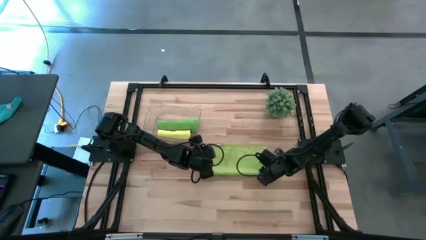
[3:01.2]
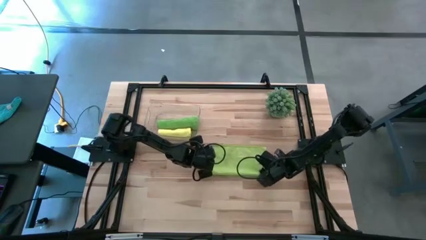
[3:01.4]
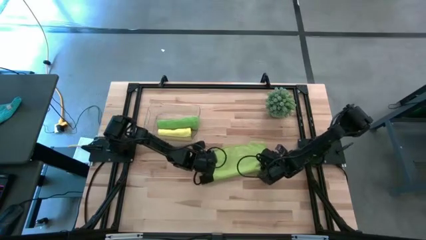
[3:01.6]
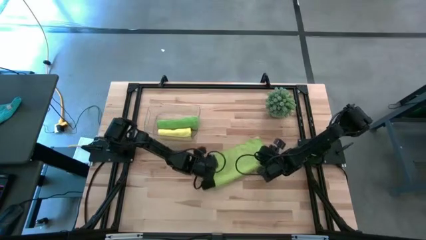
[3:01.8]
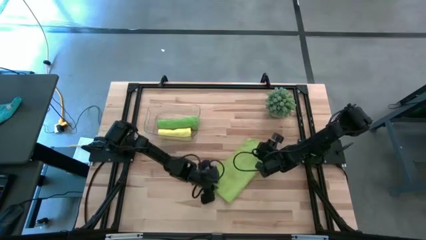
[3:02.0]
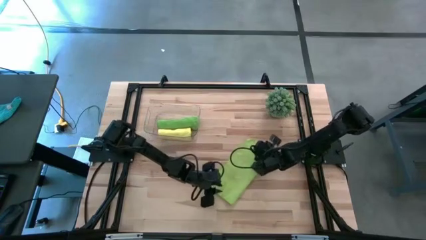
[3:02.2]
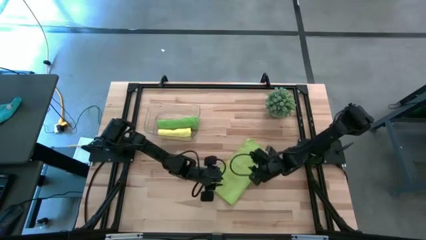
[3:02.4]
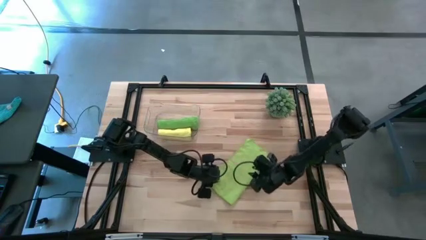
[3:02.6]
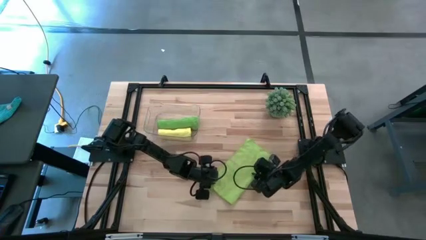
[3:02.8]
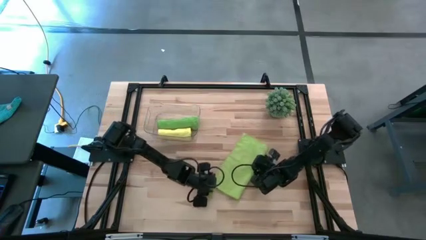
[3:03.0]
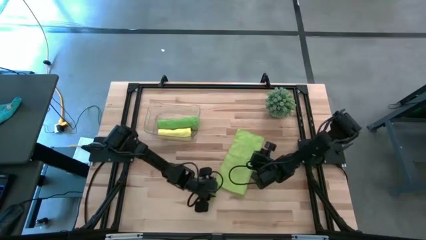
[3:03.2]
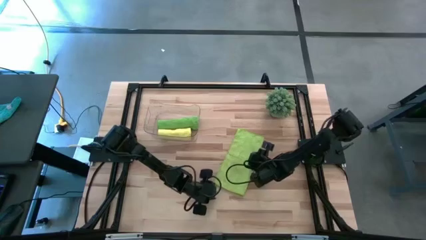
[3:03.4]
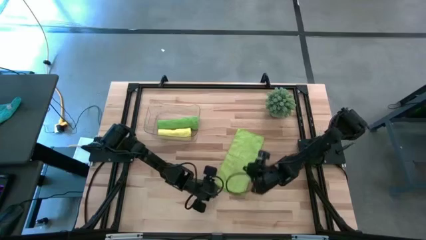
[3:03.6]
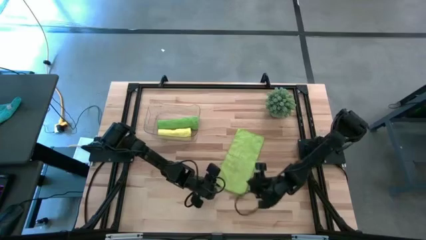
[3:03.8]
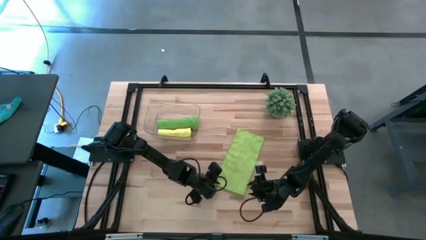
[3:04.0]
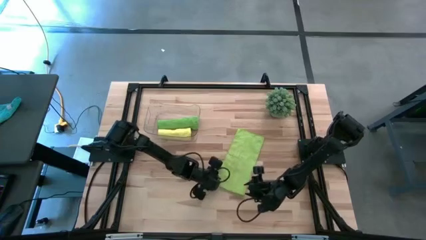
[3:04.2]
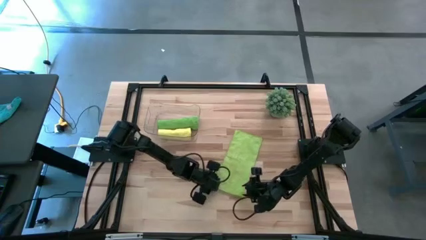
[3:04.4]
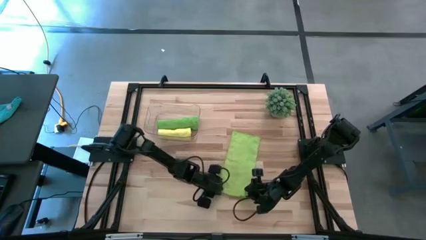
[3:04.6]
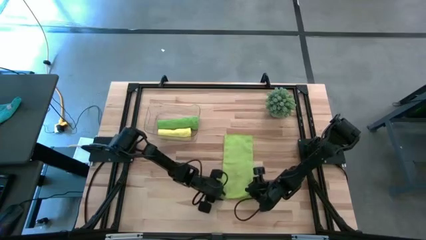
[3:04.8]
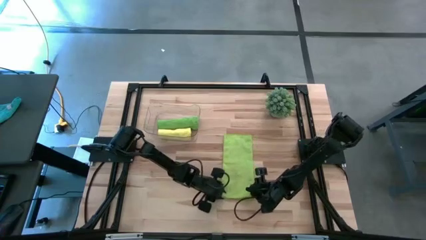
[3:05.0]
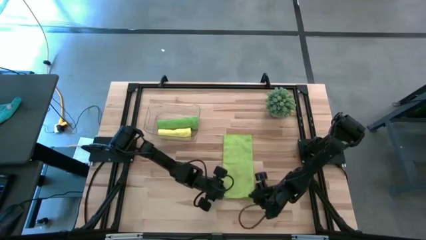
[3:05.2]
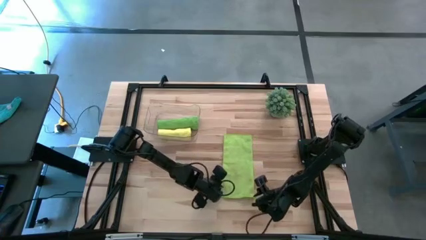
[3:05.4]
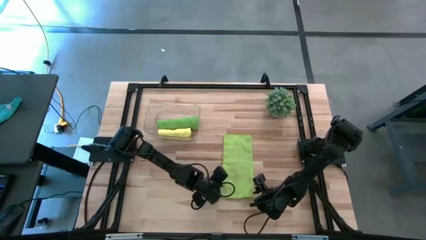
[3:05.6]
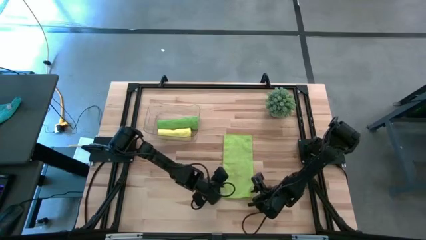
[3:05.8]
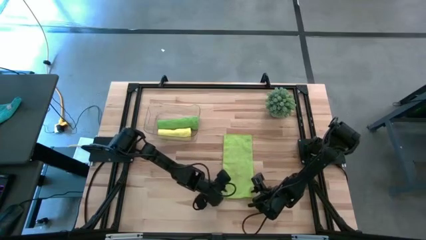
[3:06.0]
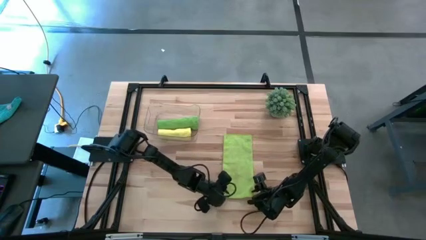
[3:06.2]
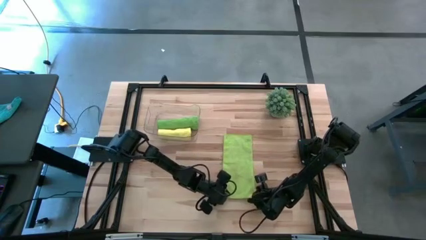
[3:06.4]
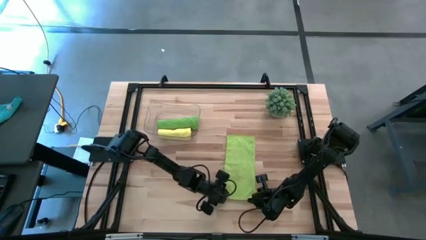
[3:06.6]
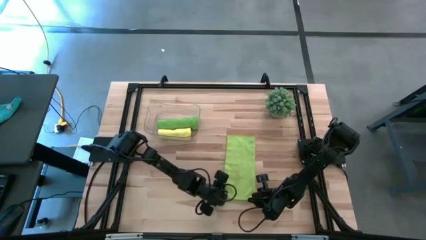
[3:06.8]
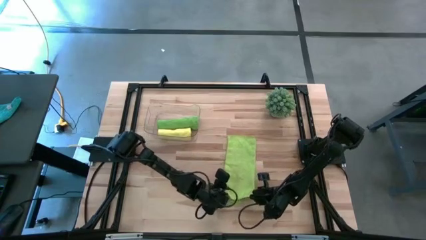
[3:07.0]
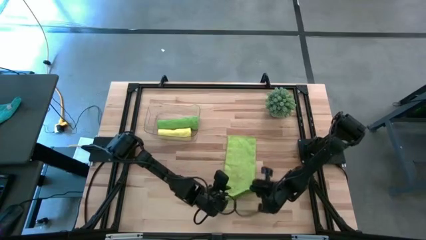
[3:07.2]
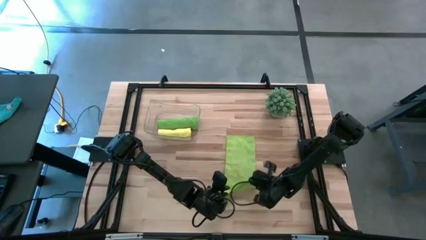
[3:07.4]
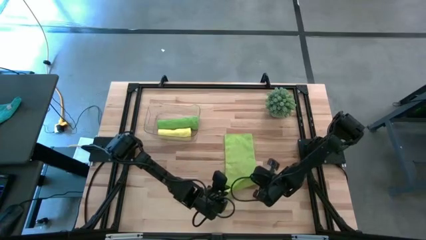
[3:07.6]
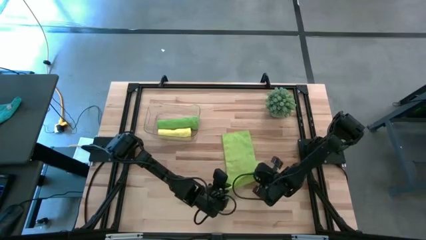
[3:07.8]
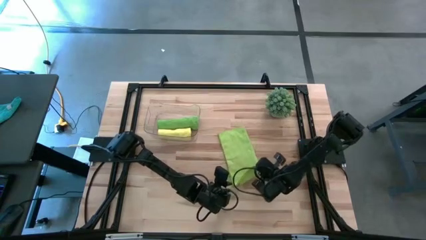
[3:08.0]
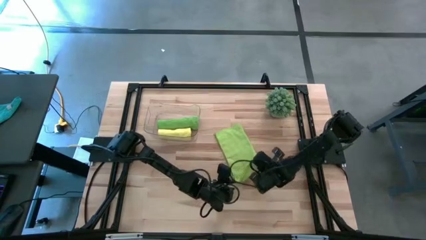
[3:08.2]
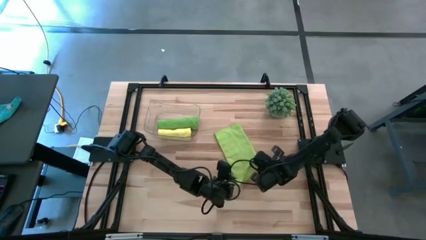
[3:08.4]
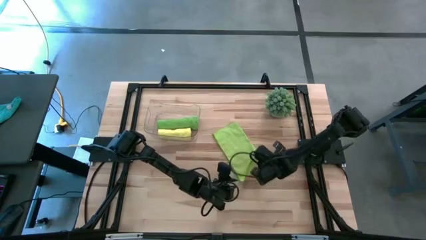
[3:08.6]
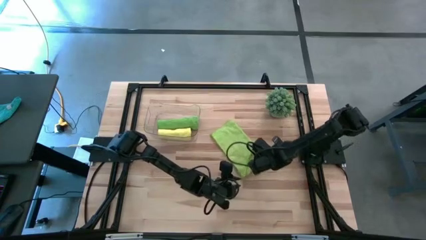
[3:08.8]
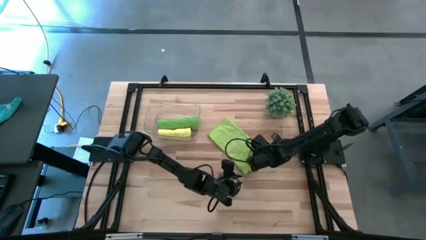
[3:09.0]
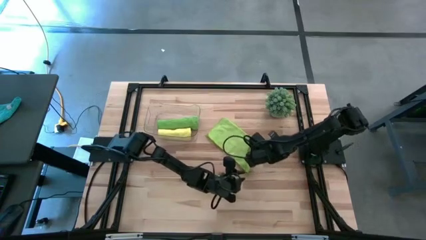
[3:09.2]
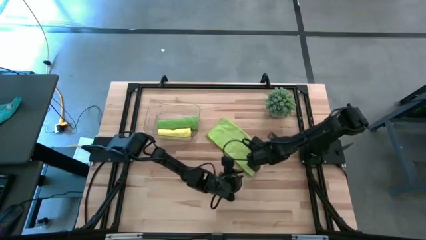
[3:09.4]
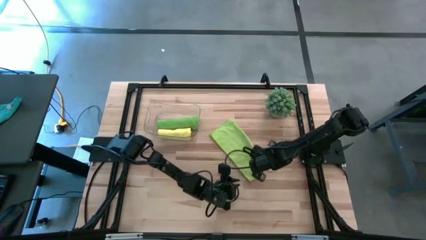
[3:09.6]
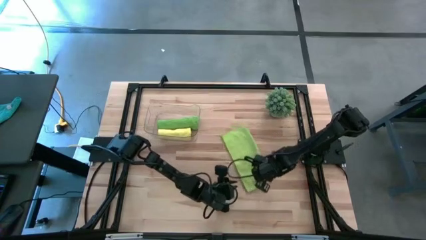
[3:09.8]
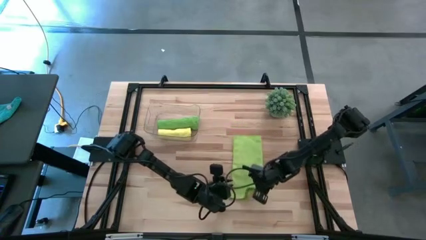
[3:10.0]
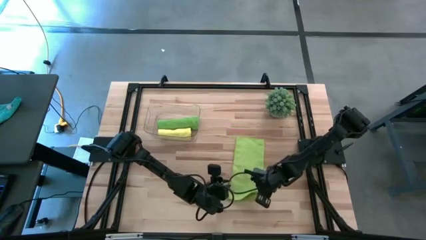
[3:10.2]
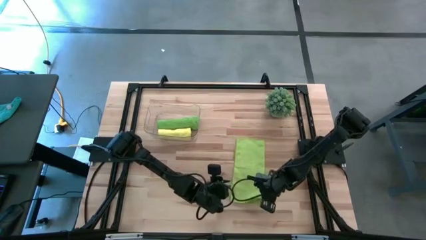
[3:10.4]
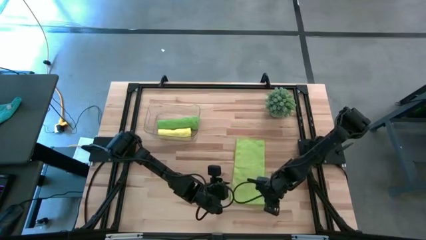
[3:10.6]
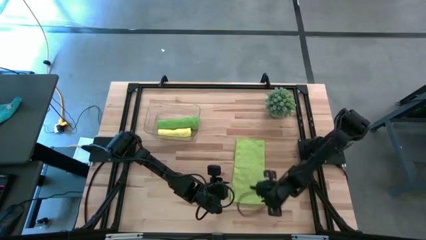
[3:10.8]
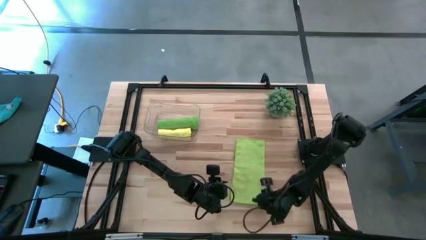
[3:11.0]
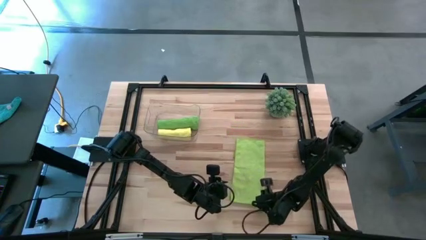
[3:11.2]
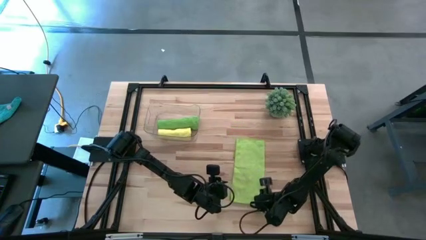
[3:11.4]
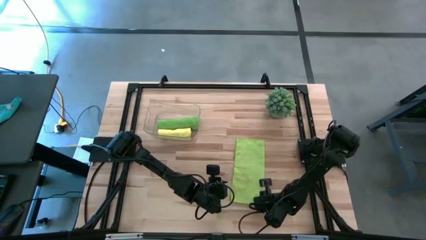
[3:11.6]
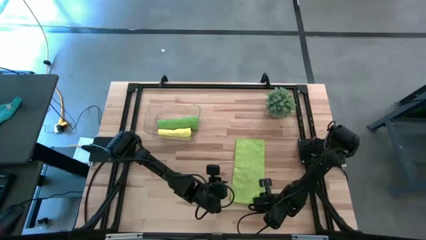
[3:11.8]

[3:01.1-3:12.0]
Task: Roll microfiber towels into tight, uniform cylinder then place into a basket
Roll the green towel

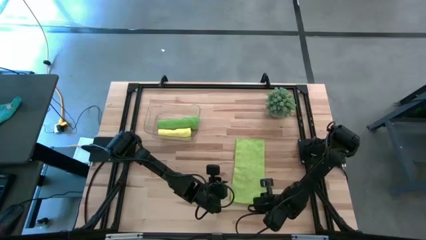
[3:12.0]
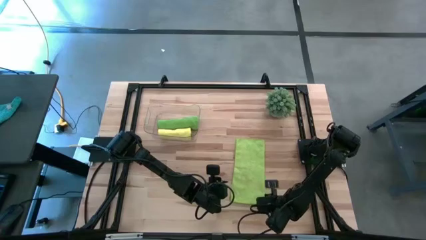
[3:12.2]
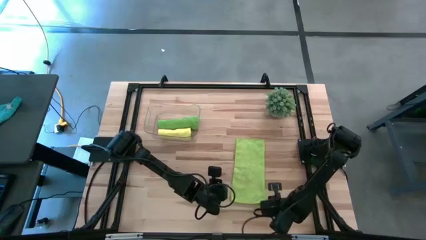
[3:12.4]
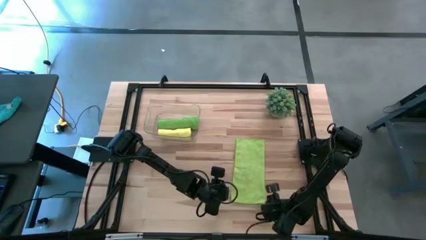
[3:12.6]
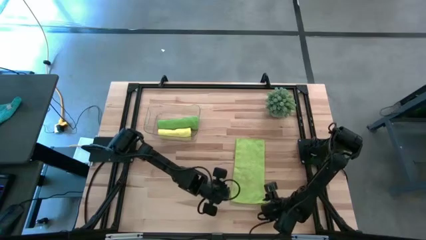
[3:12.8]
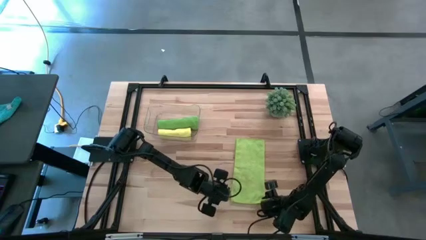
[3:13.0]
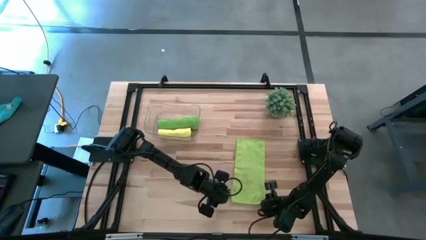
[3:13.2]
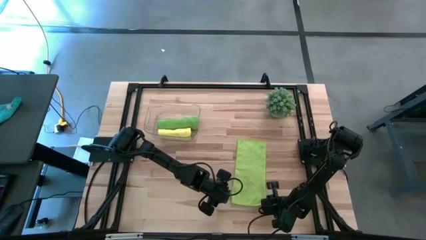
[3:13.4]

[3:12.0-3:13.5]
Roll the green towel

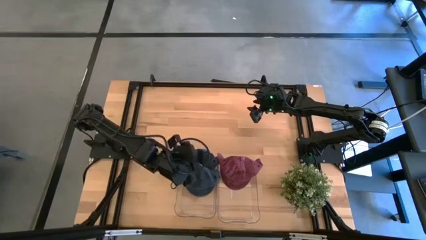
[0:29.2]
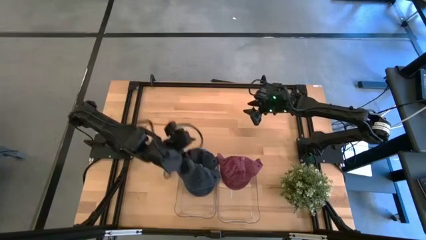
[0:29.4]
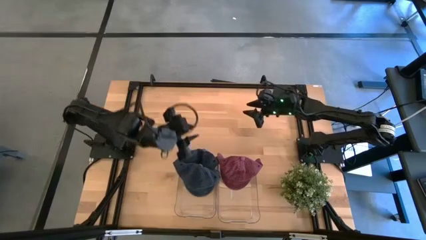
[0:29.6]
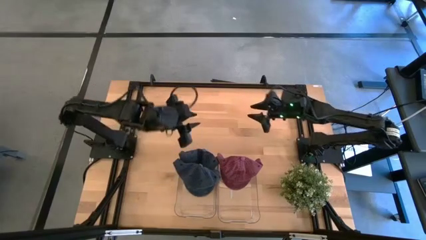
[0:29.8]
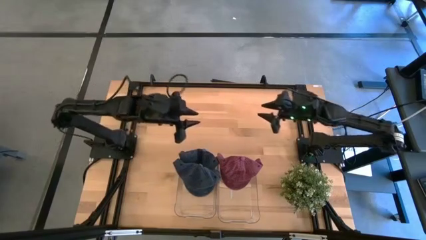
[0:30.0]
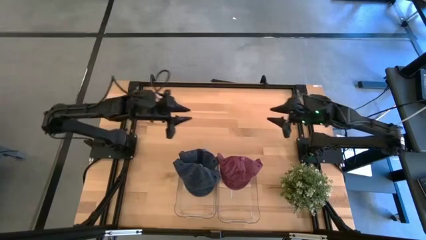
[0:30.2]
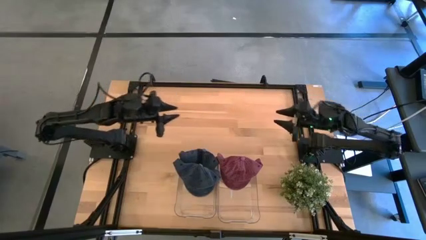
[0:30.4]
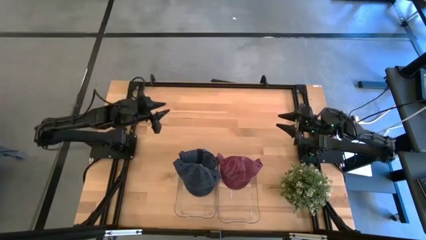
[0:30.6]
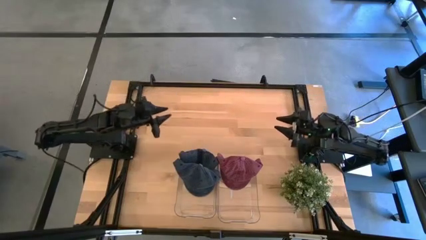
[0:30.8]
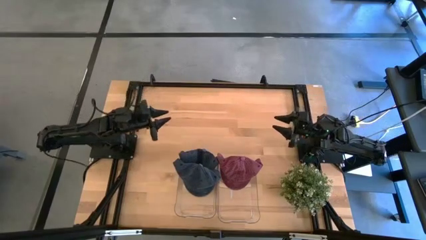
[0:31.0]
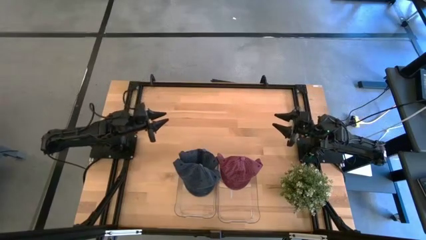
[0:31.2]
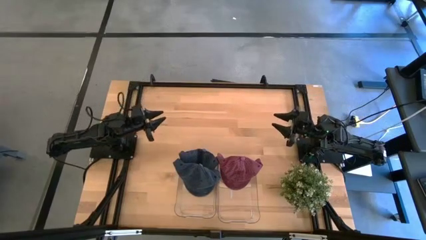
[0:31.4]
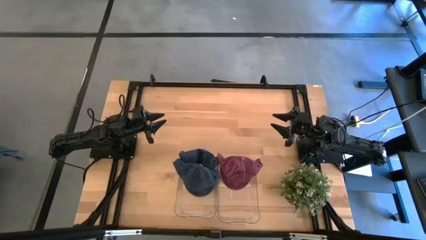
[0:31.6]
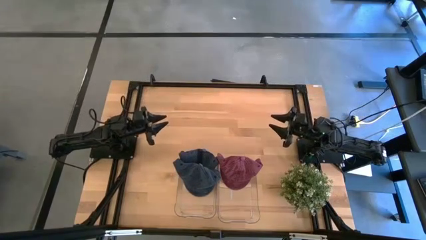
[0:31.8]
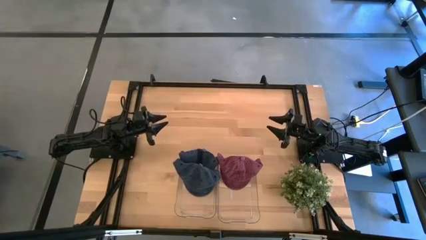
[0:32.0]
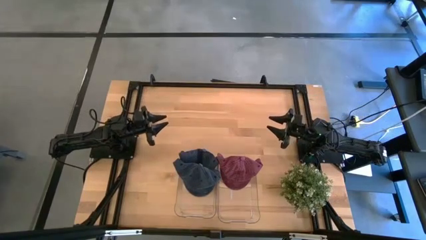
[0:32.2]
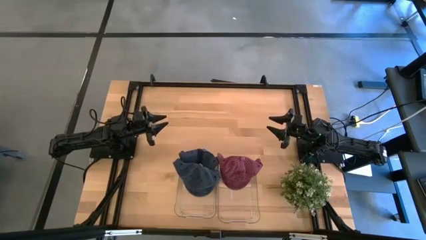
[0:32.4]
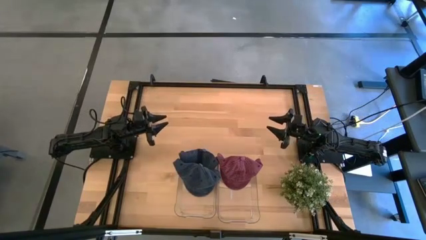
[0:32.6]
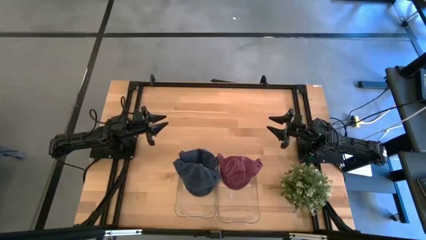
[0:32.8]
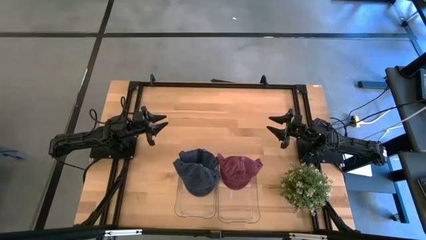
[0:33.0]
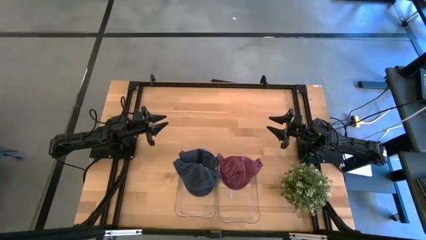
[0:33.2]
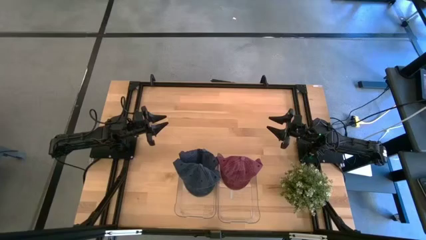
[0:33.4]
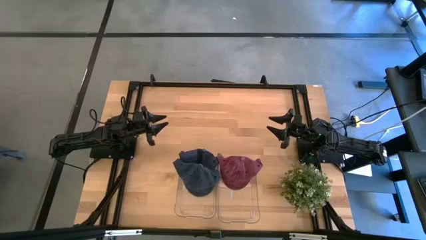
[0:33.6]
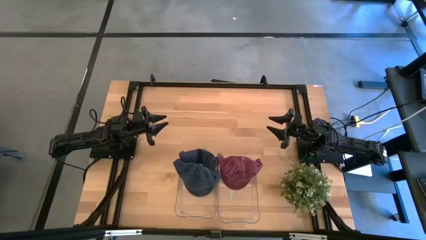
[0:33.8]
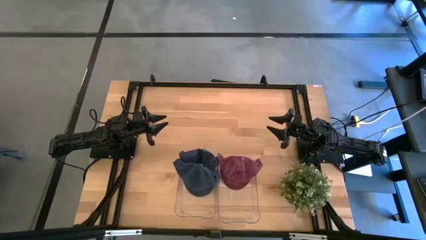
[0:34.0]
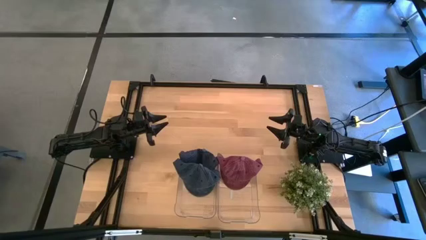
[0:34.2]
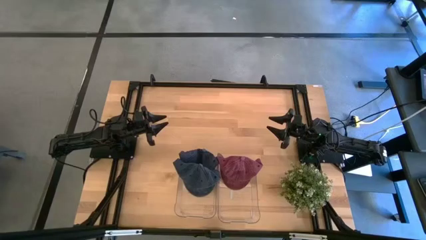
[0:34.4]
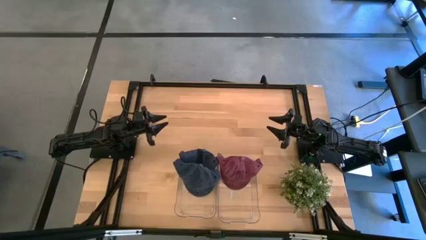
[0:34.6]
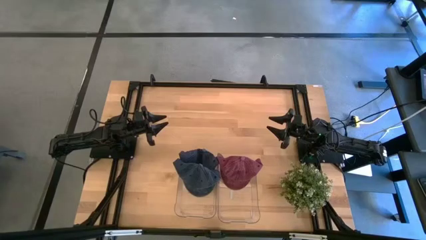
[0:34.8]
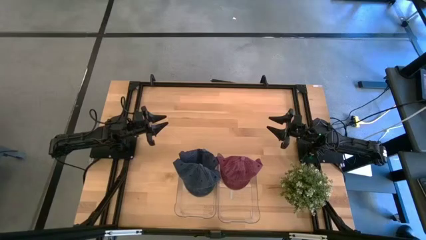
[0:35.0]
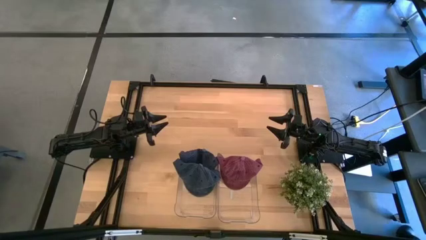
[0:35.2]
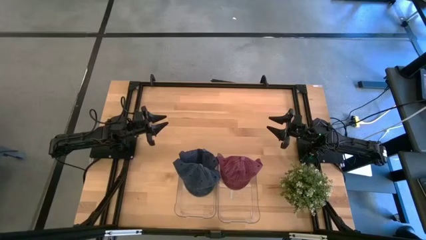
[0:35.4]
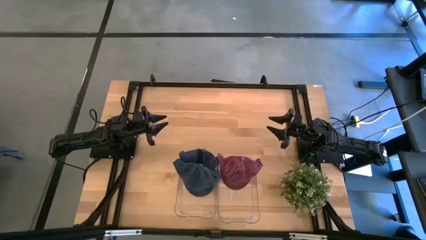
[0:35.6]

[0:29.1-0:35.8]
Task: Pick & Place hat
Return to Home Position
